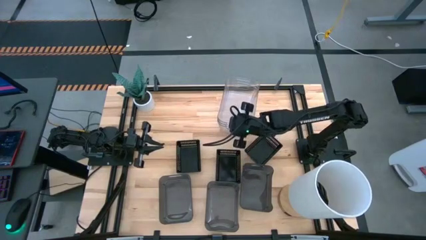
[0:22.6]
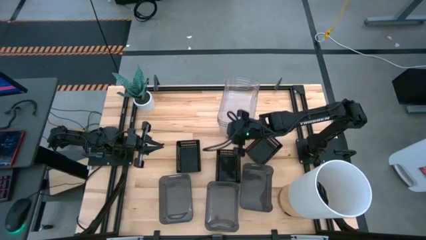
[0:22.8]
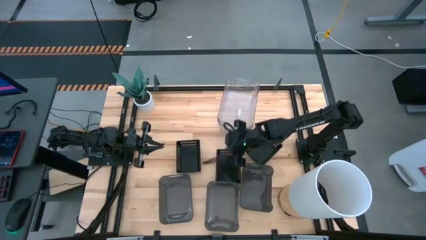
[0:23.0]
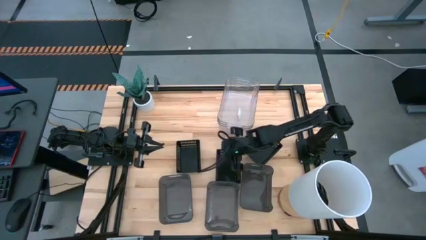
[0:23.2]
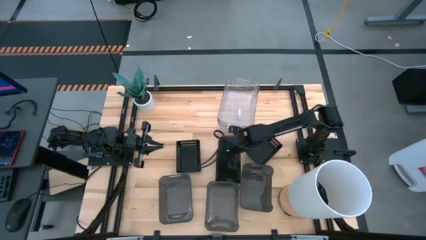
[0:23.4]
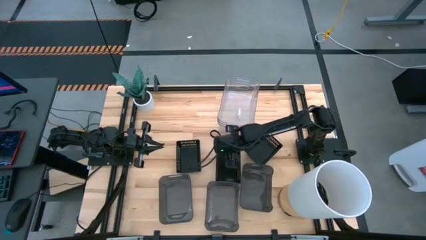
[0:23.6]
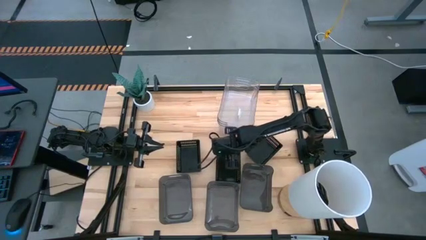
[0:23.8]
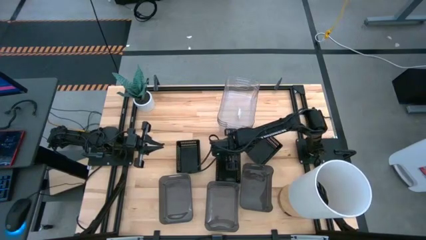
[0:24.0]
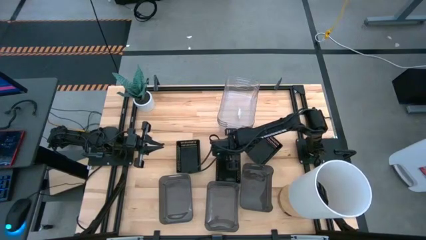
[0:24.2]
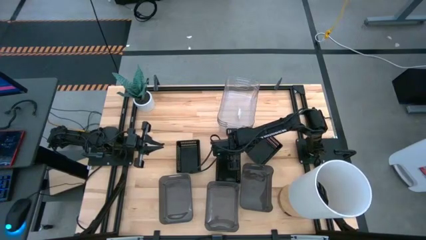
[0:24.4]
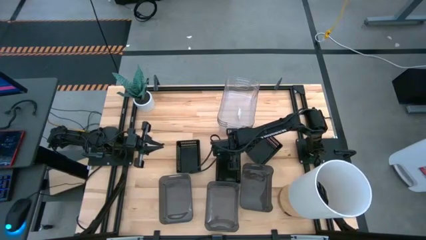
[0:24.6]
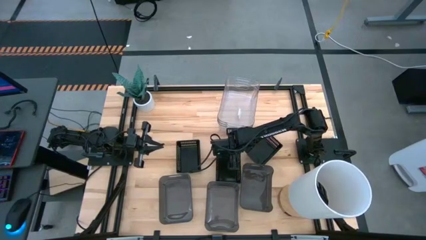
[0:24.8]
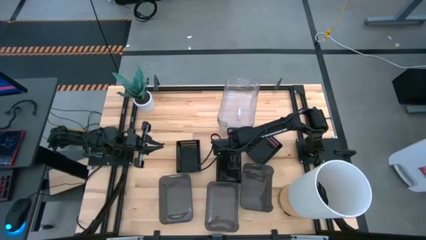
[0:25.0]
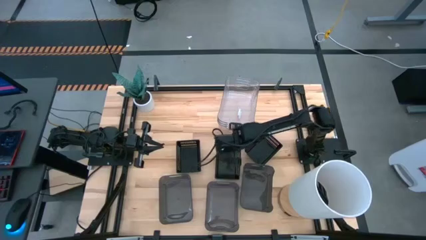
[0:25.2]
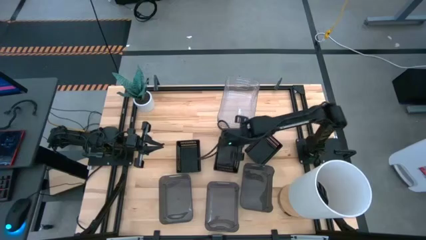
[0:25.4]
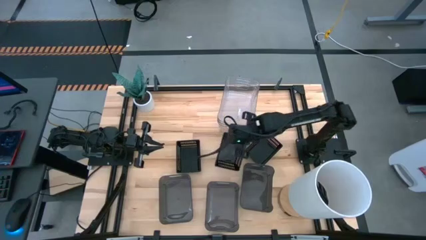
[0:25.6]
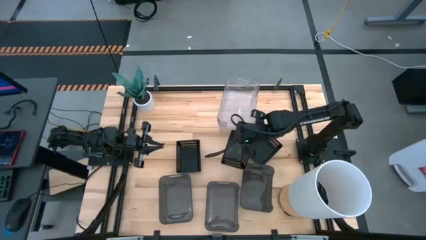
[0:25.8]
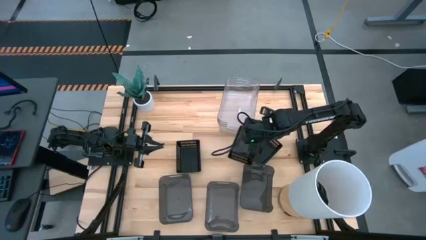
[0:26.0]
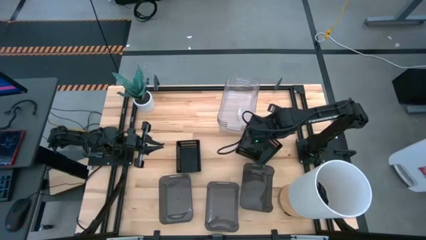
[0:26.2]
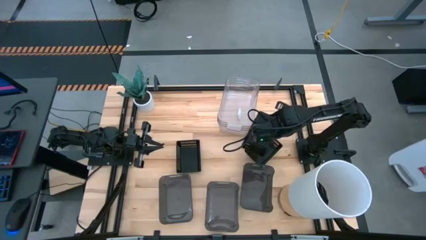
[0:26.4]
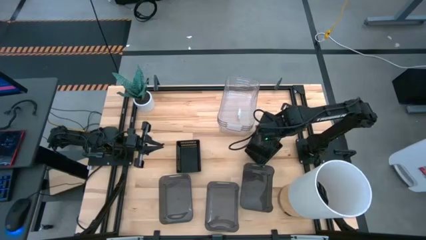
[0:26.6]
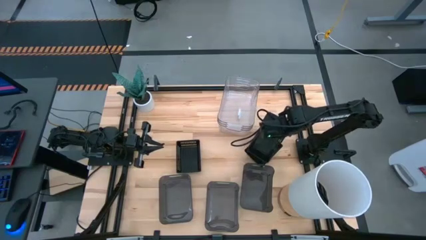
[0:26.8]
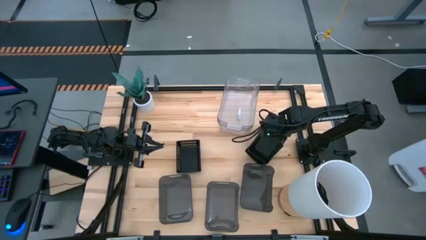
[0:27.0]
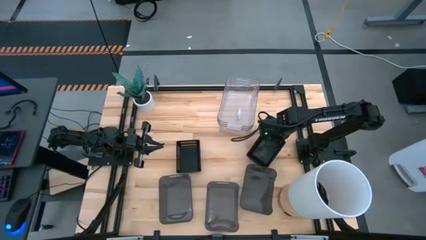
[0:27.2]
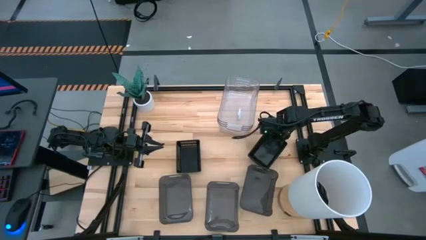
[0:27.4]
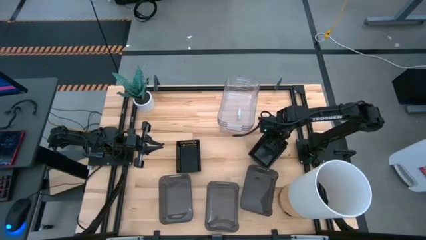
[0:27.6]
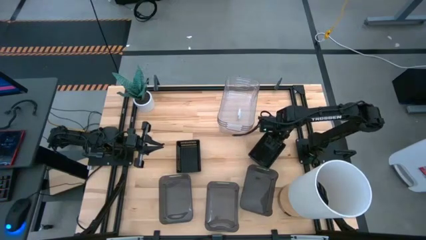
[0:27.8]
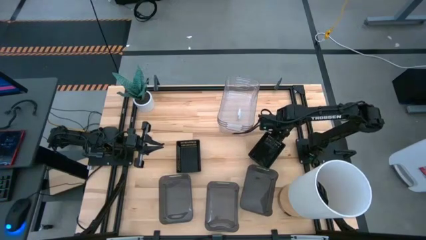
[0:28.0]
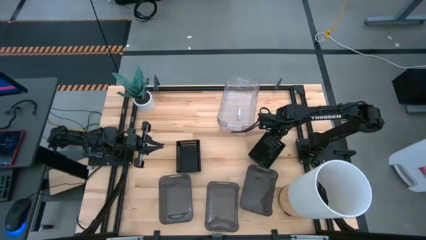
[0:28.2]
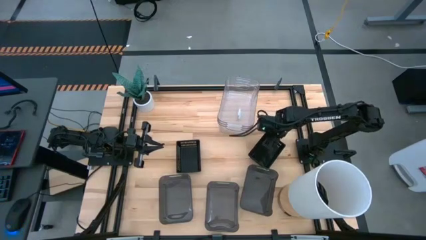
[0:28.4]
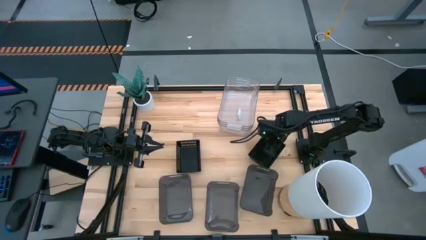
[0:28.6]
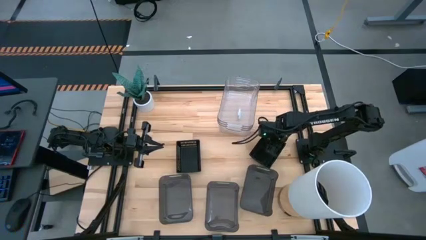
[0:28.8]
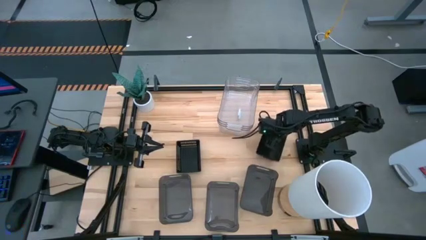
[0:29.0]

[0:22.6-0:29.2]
Stack the middle black bin on top of the right black bin

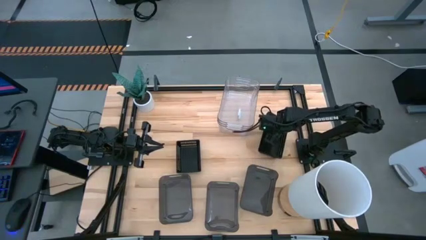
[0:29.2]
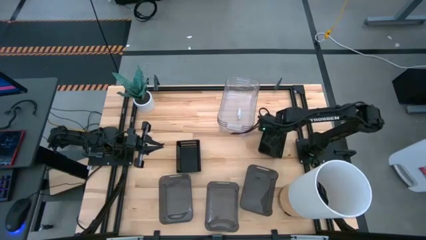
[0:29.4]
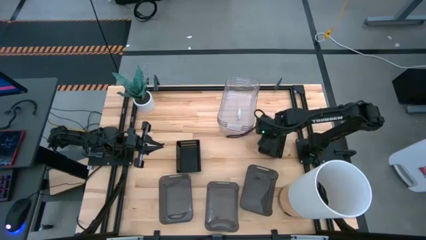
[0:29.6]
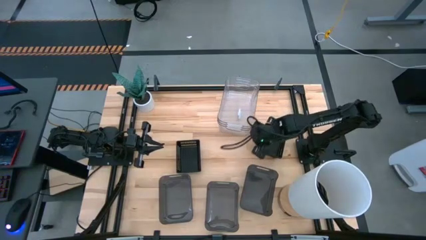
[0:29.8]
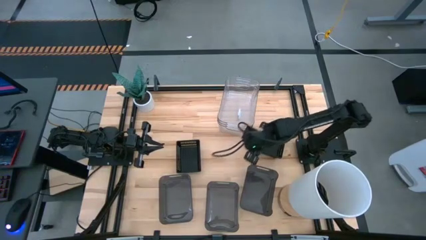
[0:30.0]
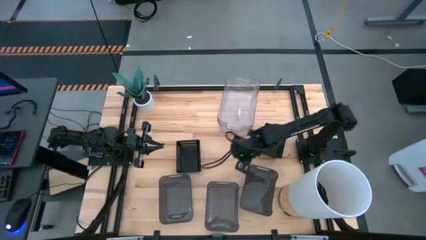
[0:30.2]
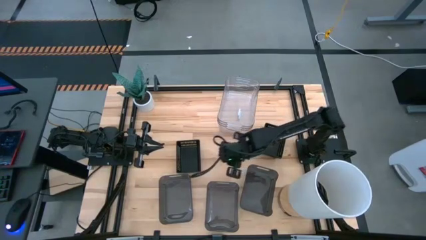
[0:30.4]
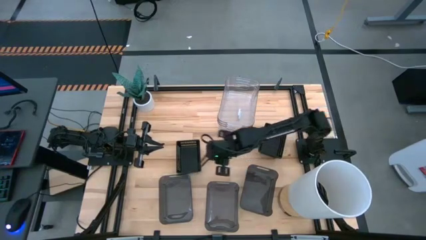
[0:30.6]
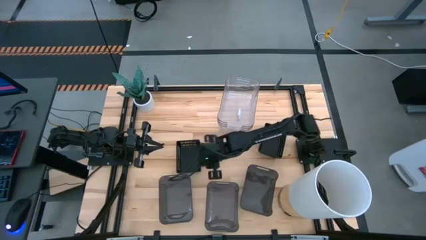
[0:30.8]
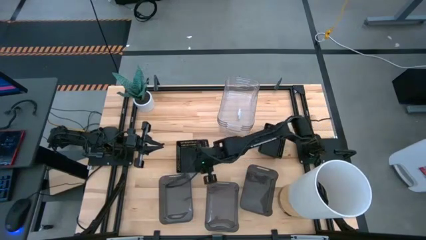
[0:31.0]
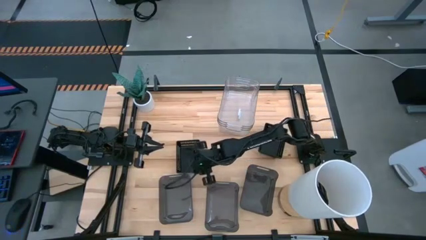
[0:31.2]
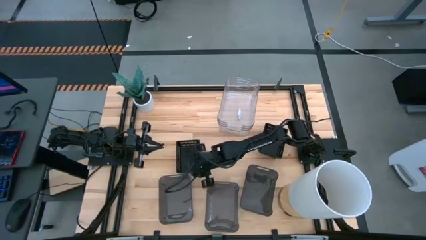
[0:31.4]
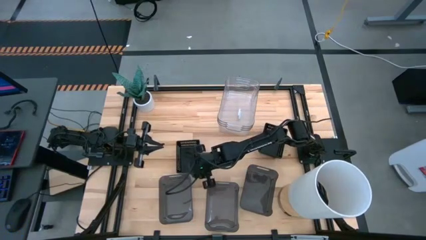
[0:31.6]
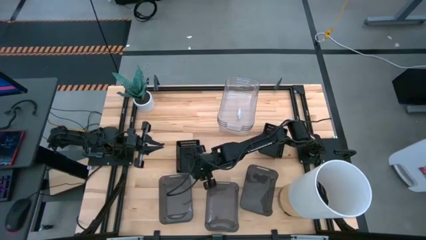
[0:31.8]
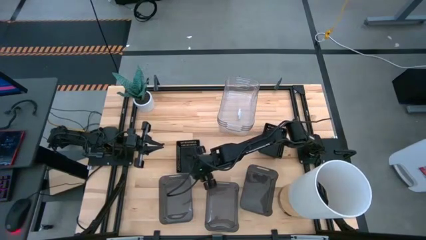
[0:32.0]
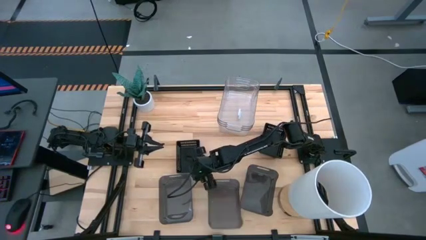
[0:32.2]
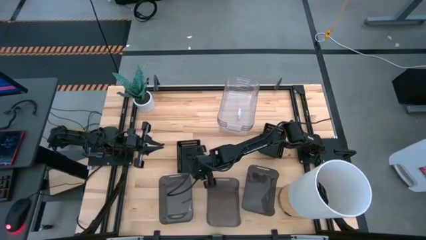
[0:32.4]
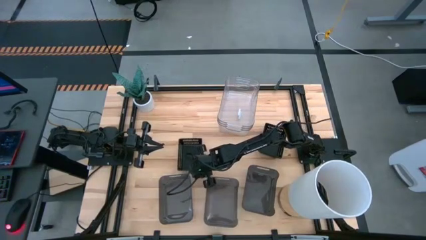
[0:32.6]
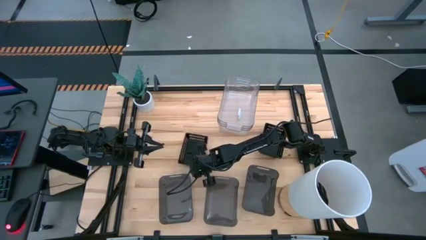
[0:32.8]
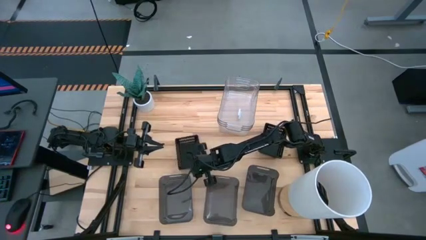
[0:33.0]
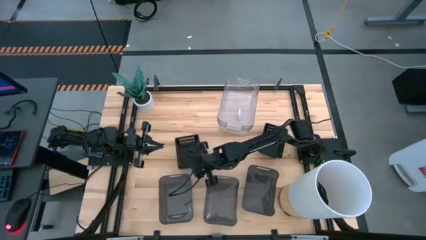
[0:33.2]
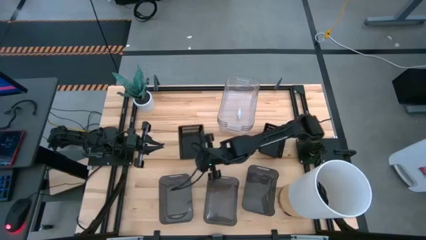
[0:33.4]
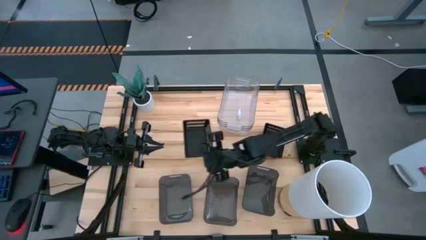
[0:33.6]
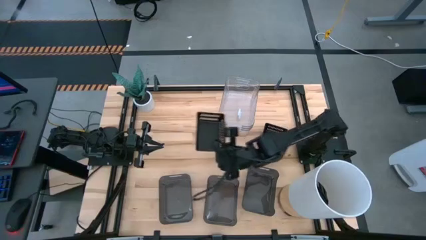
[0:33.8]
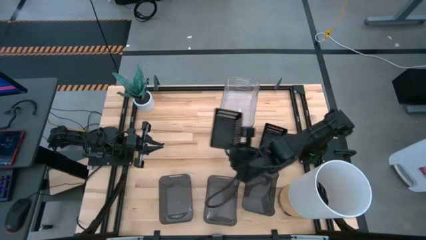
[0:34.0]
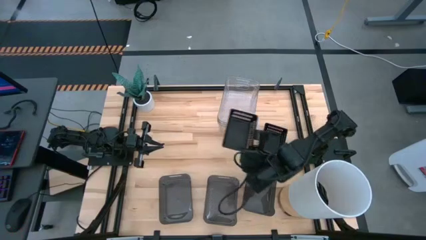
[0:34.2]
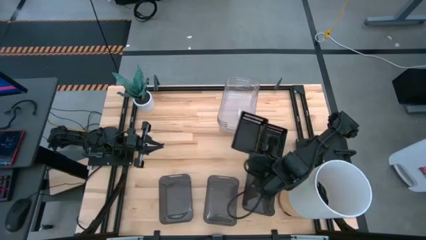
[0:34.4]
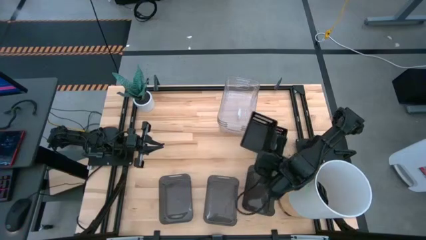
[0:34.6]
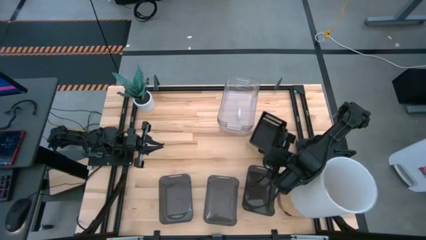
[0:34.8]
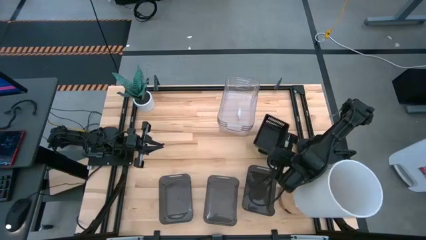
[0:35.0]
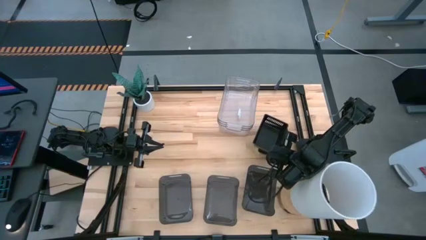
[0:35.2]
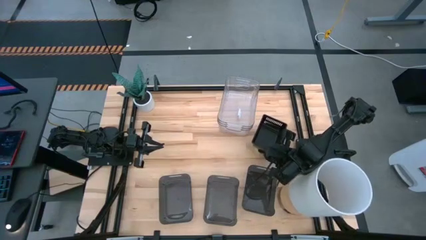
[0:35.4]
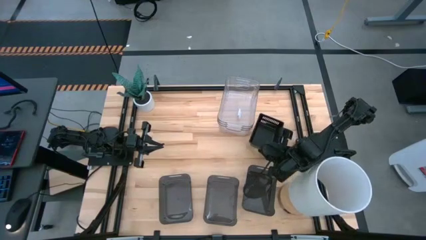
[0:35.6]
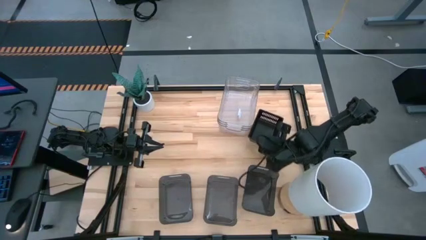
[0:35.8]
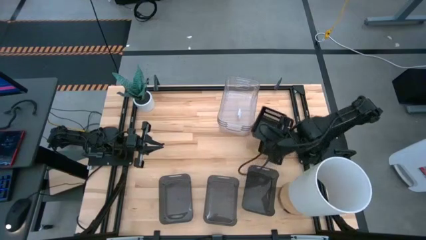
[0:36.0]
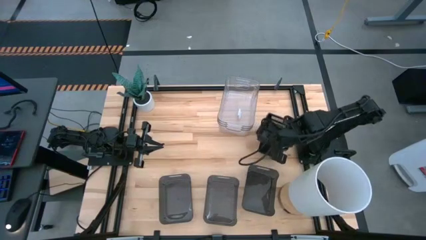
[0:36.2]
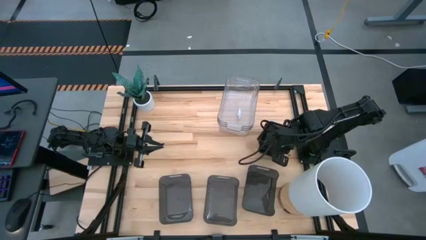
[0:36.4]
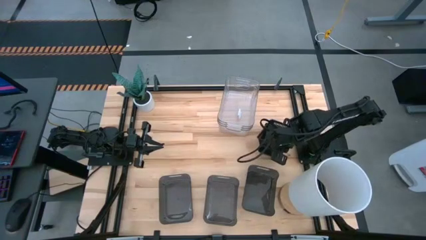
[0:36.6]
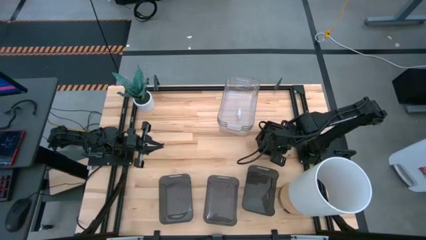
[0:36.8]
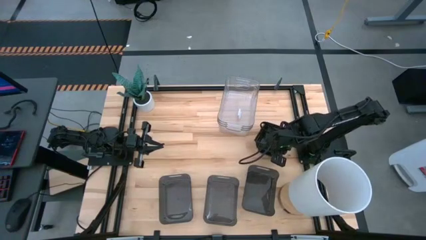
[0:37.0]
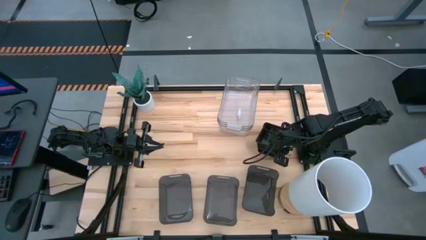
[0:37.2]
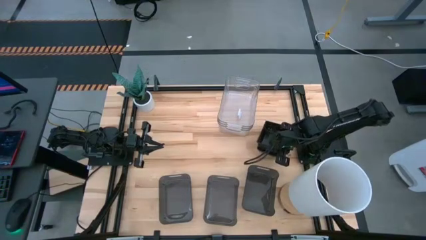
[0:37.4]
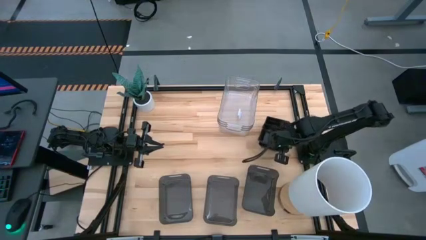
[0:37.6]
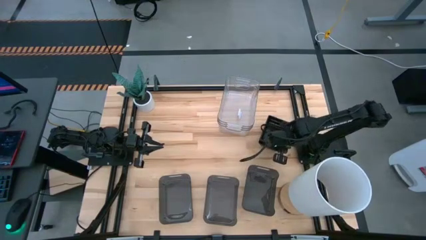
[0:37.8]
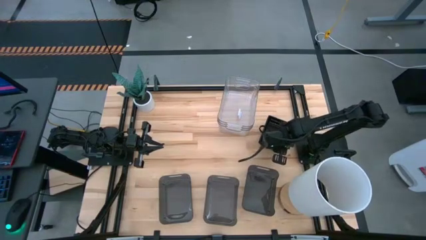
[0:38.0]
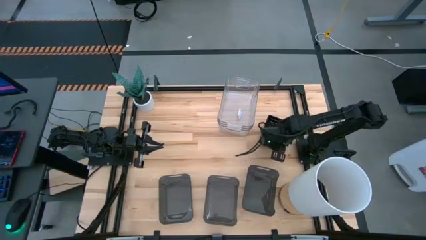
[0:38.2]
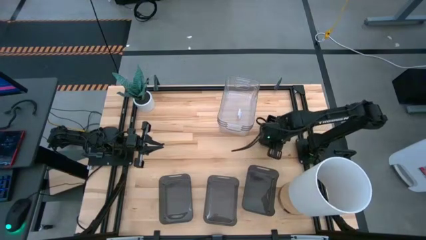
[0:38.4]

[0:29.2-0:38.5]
Stack the left black bin on top of the right black bin
